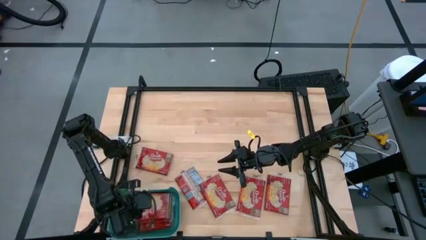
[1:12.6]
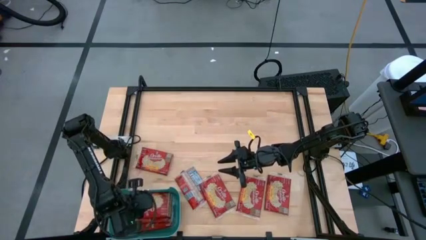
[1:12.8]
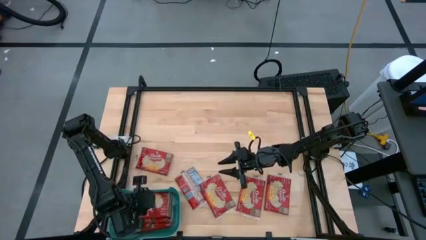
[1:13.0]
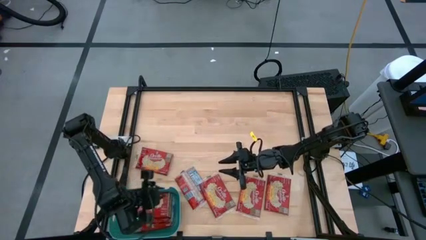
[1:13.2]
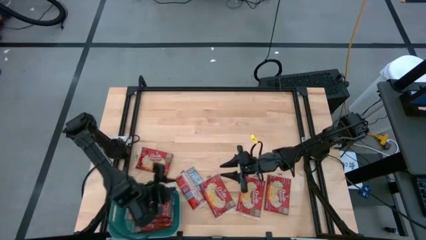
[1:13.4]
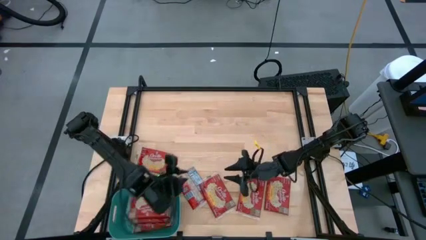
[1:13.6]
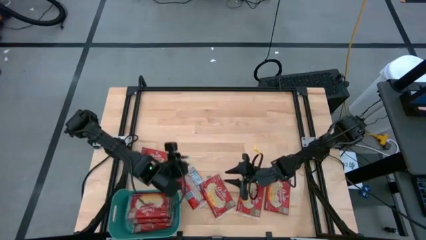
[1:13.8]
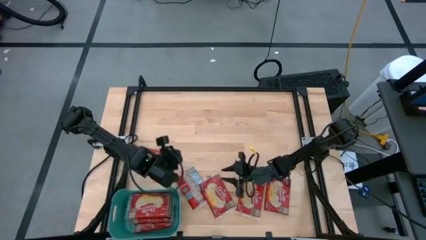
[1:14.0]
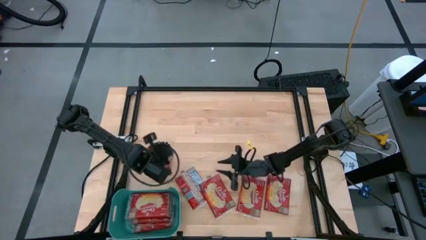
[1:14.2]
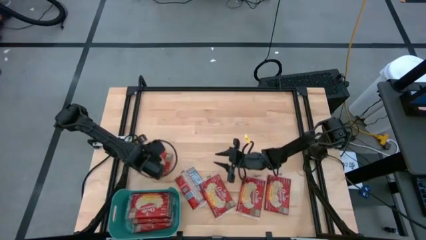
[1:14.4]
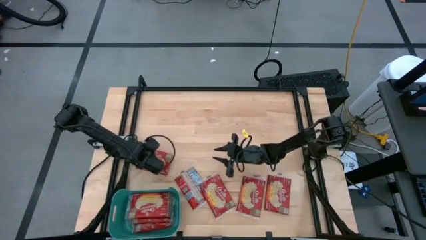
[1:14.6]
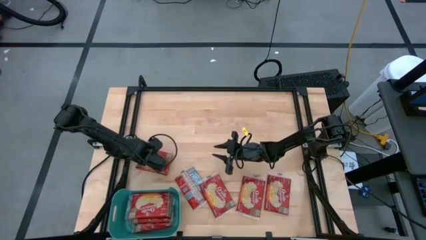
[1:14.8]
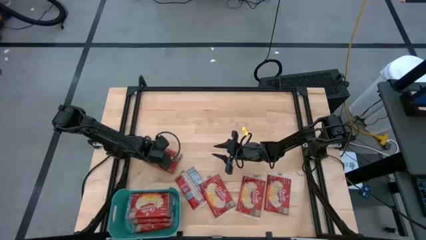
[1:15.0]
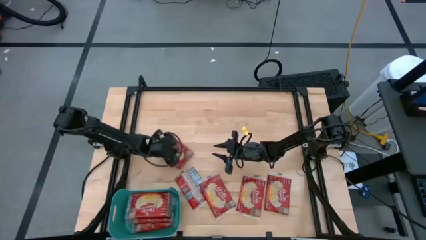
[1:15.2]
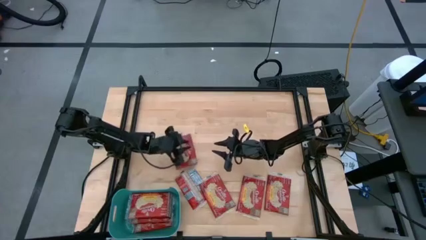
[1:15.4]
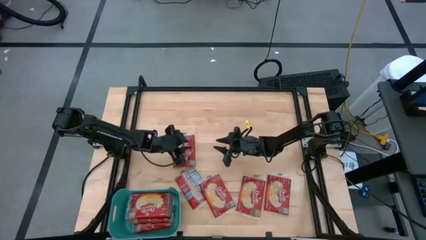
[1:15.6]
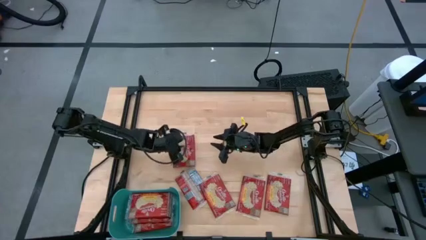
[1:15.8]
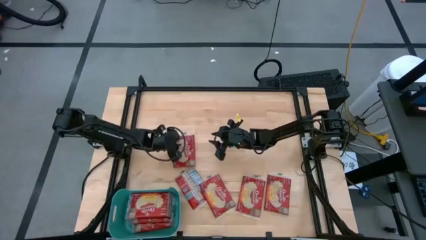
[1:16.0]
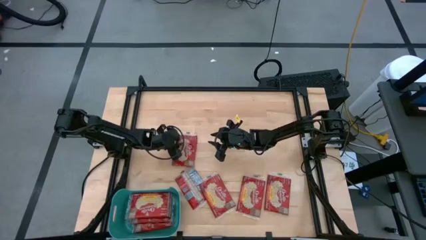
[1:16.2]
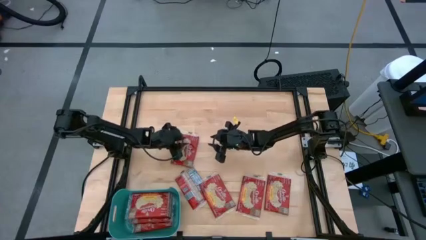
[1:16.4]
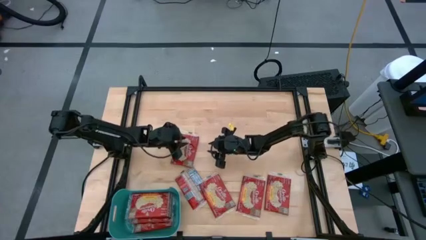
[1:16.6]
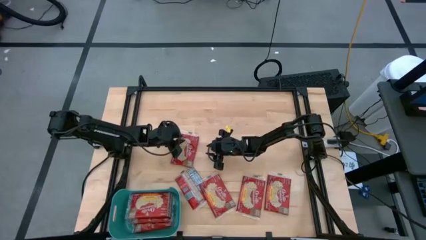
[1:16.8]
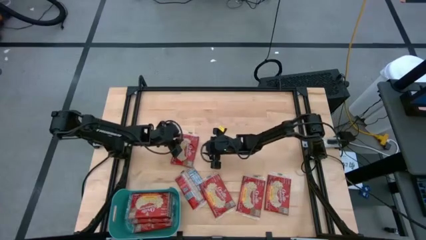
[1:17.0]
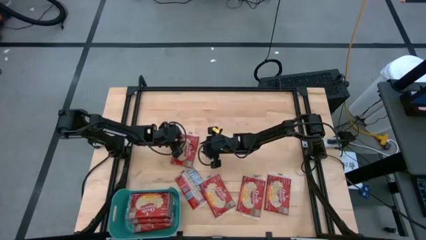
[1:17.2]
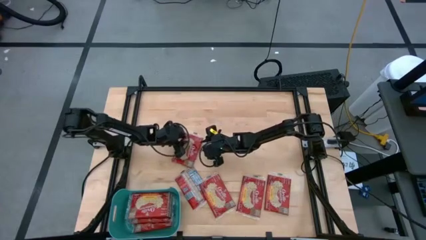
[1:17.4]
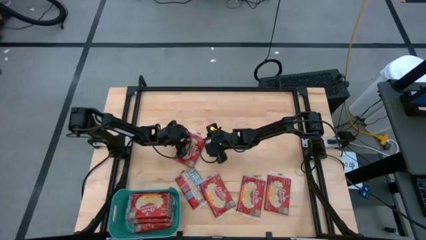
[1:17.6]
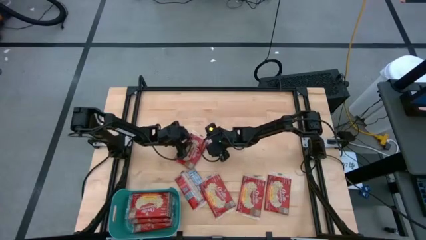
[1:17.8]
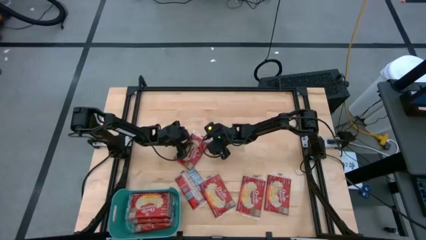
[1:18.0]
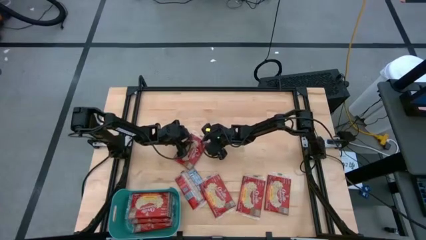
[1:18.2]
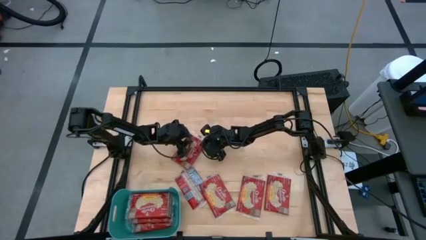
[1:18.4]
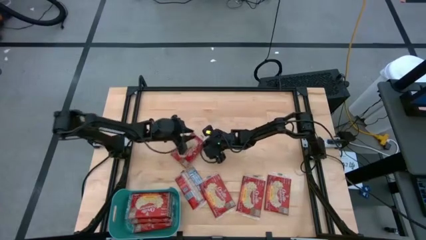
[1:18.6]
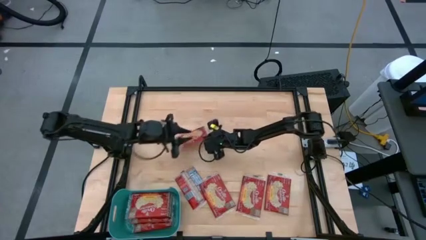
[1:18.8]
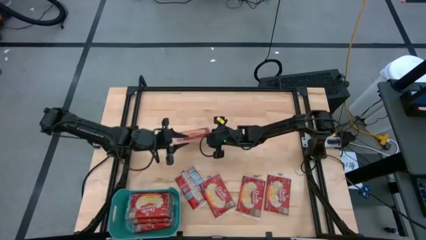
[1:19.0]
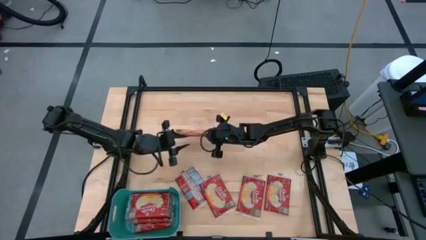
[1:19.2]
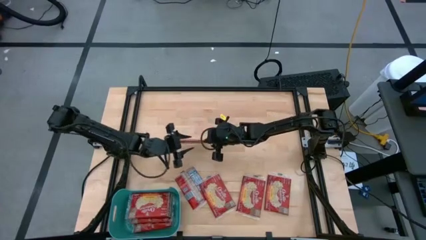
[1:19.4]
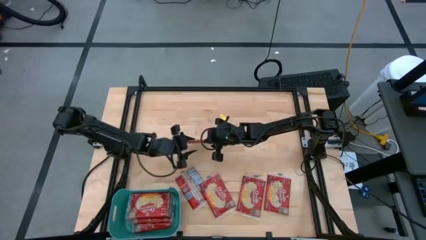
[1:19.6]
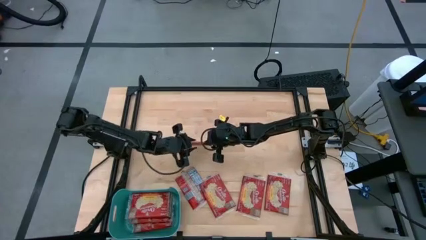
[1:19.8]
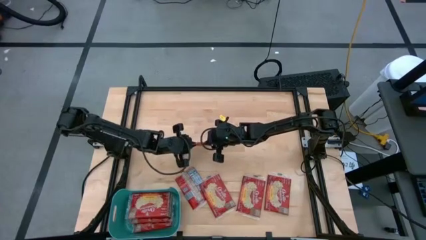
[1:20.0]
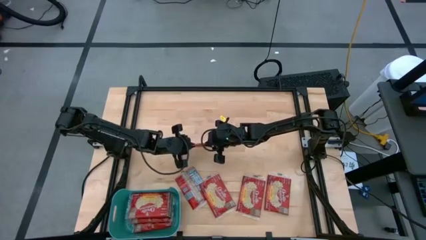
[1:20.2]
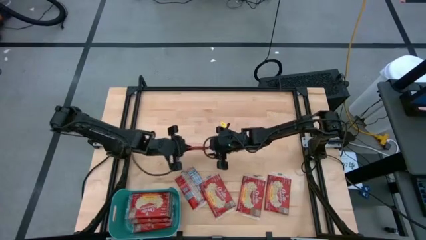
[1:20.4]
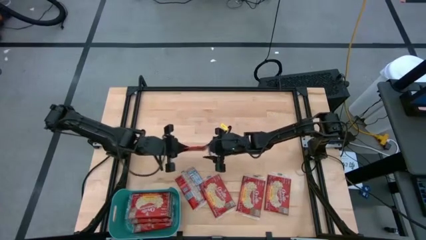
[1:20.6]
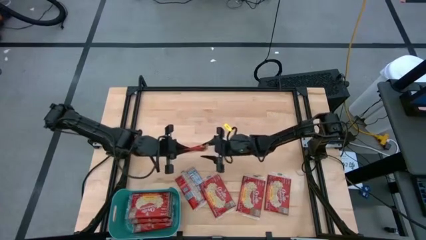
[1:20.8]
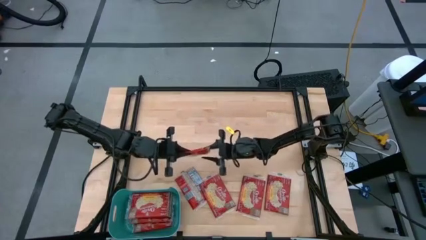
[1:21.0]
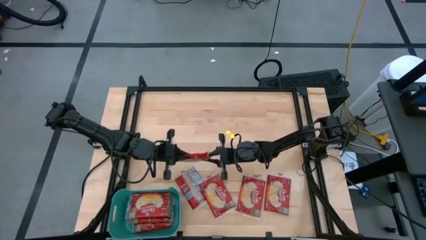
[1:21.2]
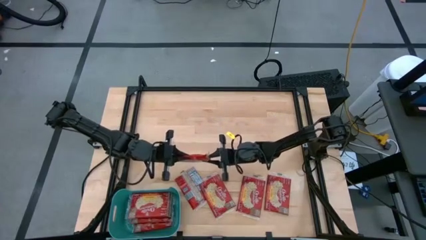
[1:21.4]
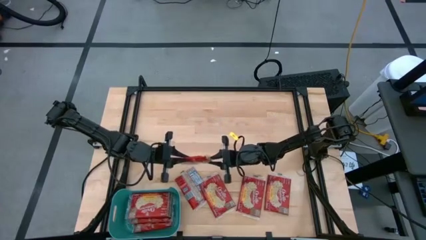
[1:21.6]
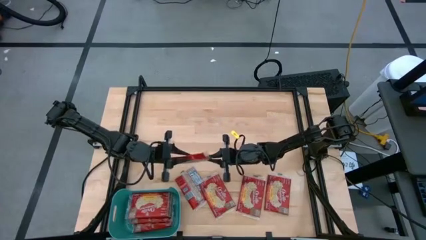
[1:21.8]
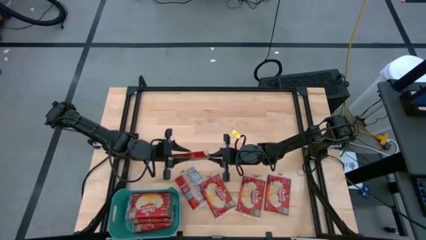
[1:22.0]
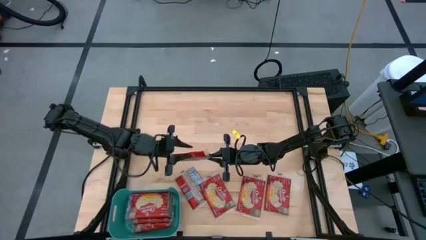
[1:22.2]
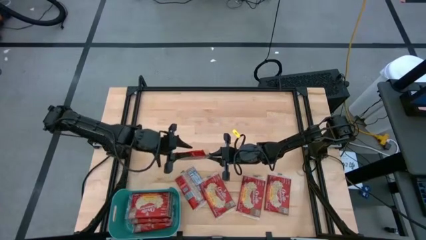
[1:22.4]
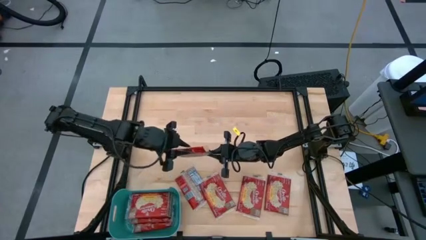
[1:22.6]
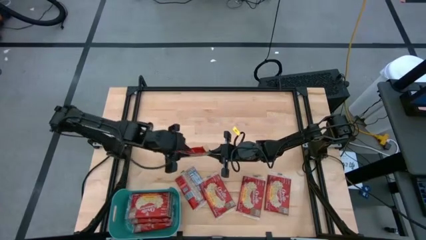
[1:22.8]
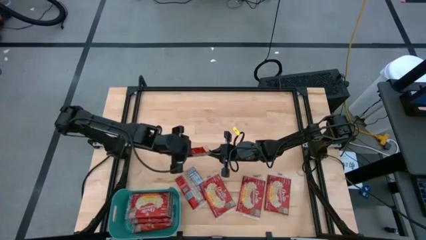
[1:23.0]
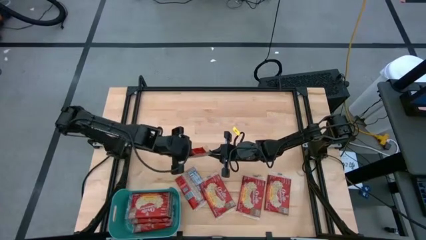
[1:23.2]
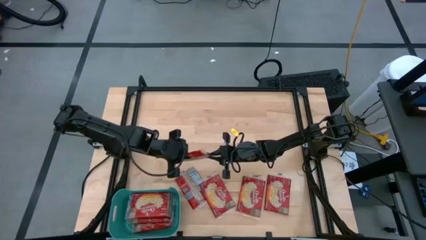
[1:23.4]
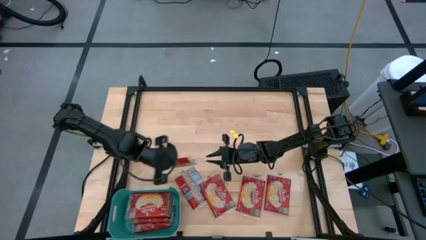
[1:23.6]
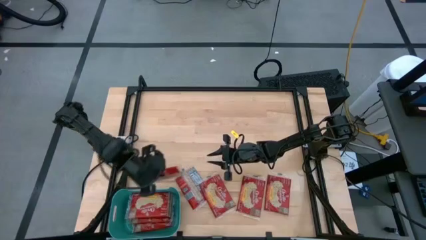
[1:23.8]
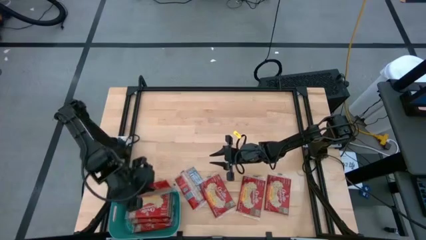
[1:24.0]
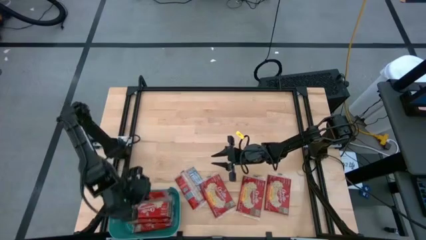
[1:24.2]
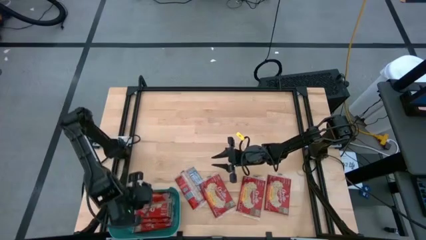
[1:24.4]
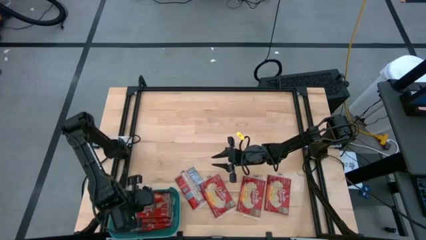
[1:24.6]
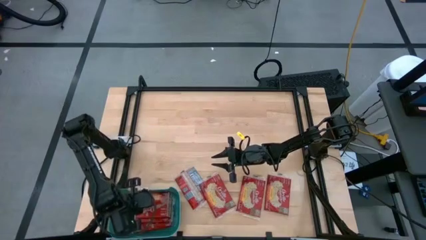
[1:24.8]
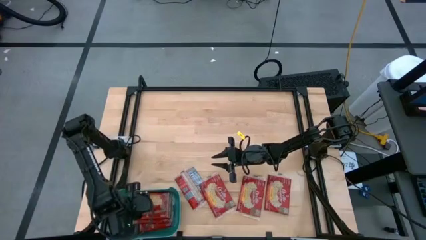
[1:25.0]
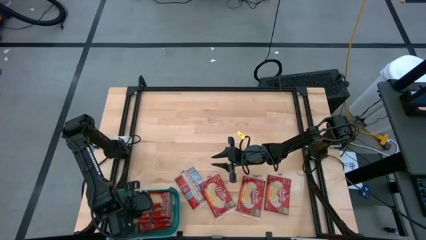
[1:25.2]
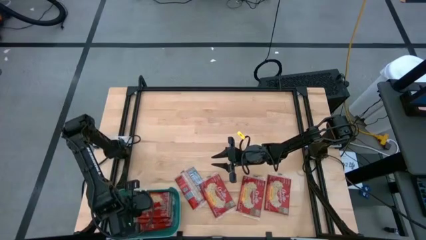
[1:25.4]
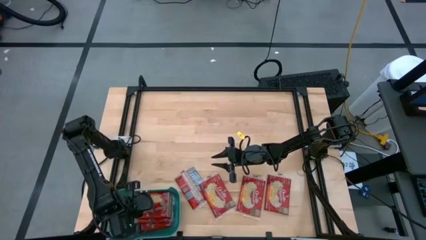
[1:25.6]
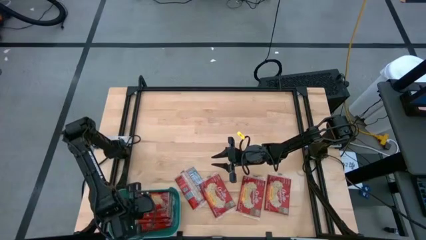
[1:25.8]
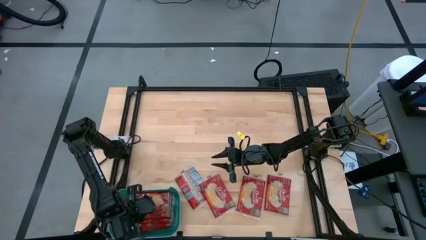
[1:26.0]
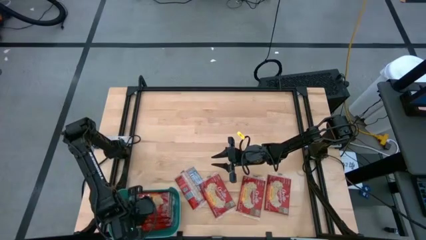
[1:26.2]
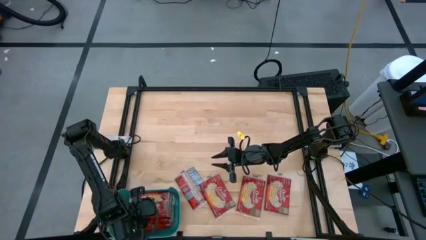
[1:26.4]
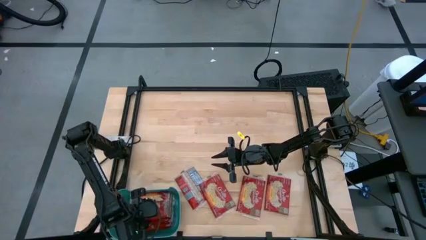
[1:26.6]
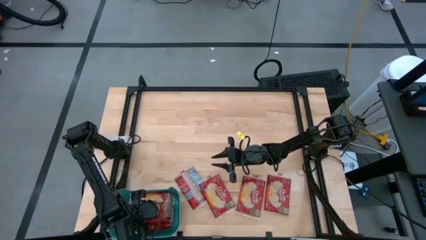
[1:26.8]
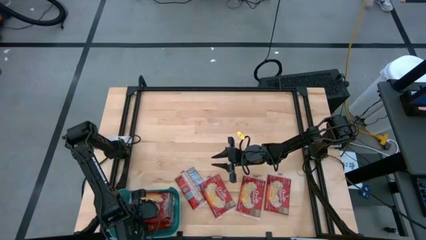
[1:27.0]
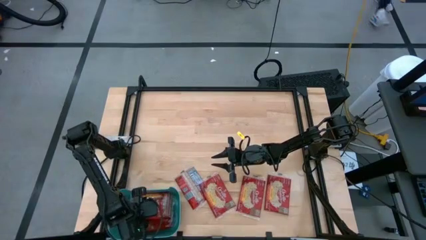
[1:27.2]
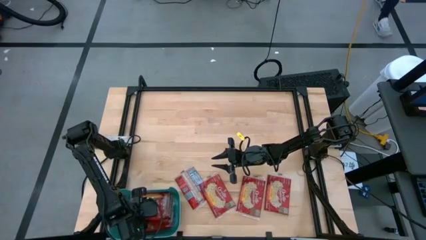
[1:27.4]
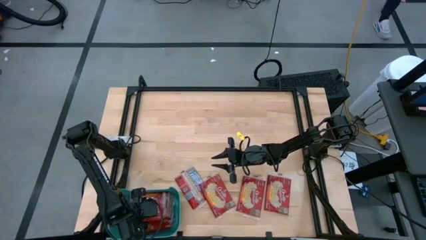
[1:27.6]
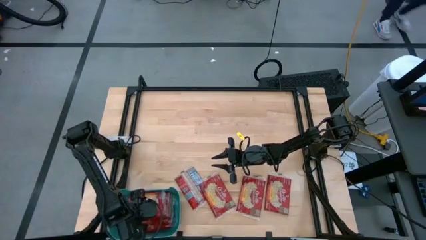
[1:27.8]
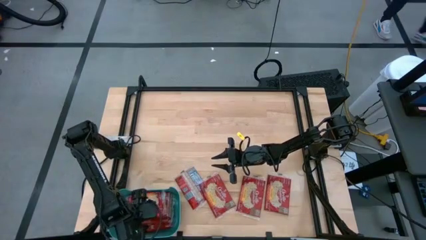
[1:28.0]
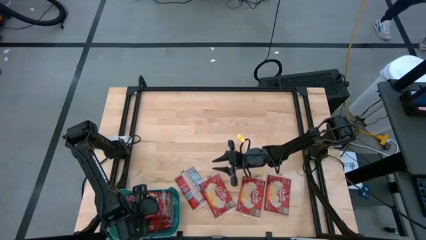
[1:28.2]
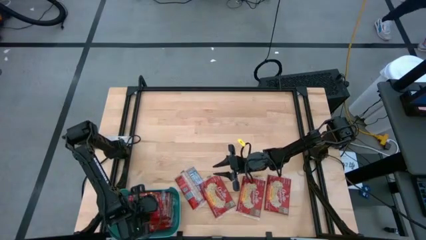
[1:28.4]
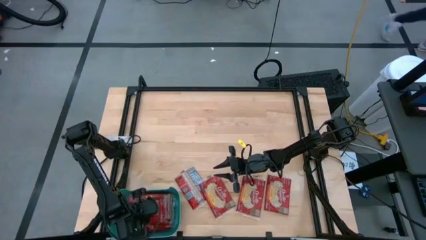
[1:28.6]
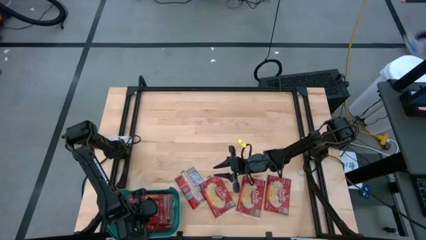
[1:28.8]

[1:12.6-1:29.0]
Task: Sort popcorn bags into baskets
Put the red popcorn bag into the blue container
